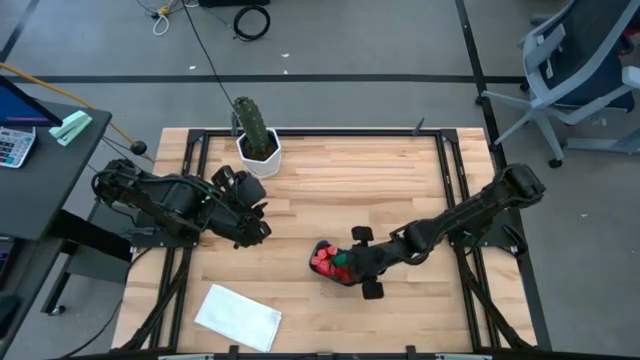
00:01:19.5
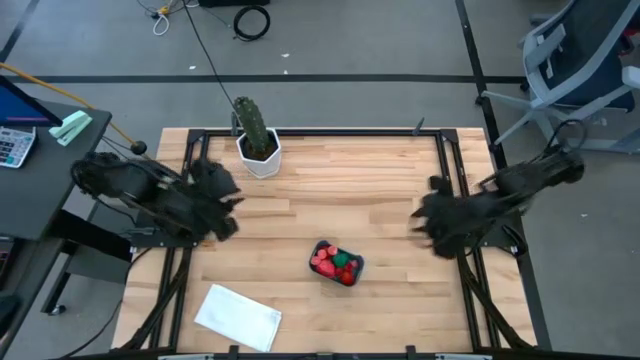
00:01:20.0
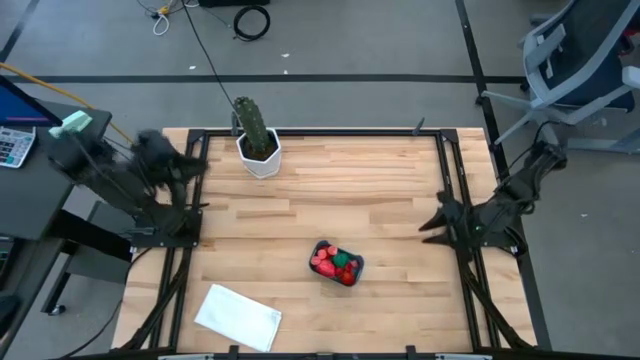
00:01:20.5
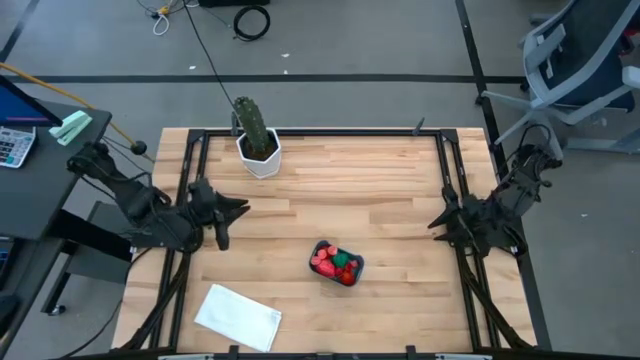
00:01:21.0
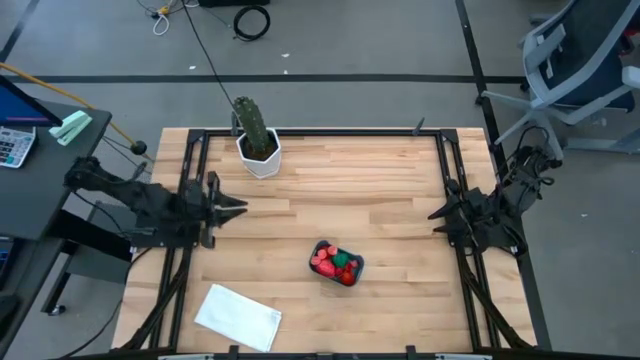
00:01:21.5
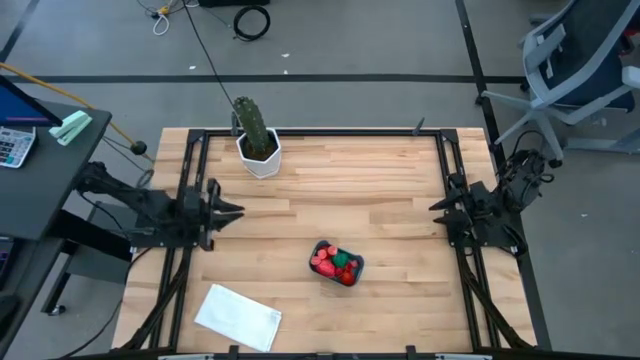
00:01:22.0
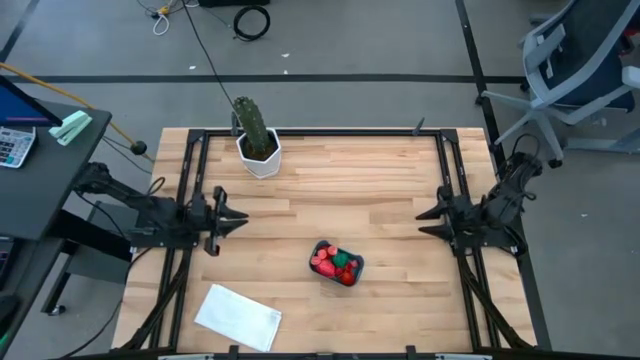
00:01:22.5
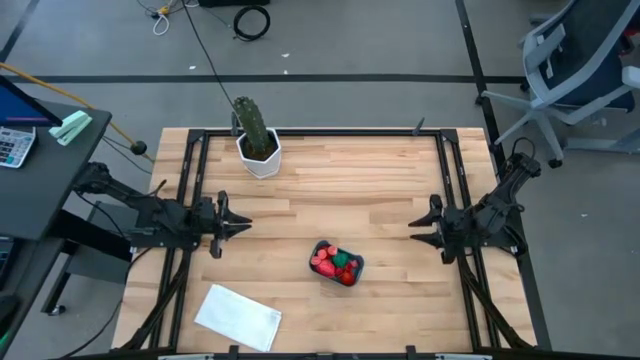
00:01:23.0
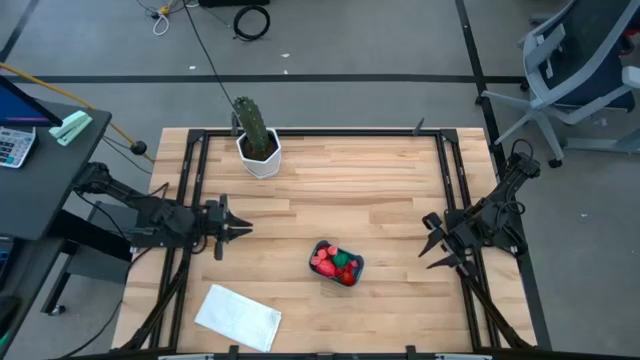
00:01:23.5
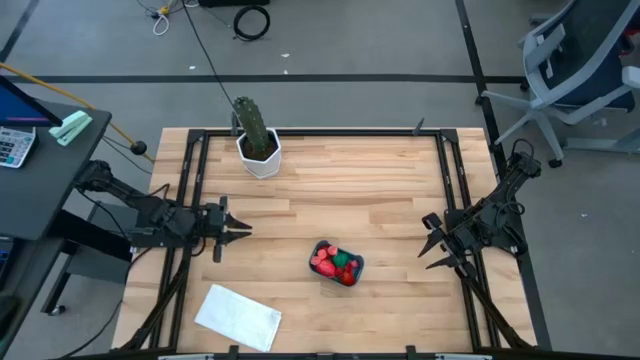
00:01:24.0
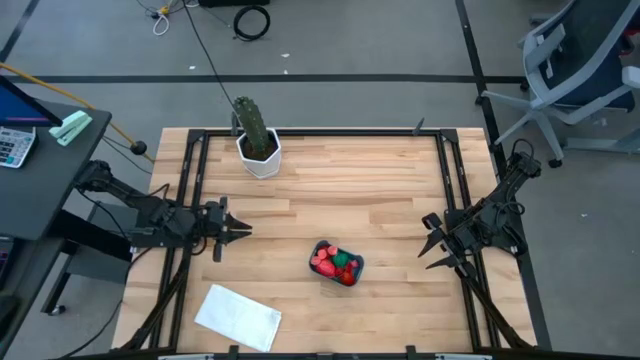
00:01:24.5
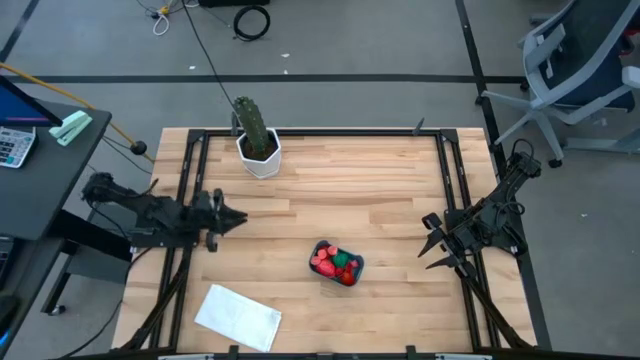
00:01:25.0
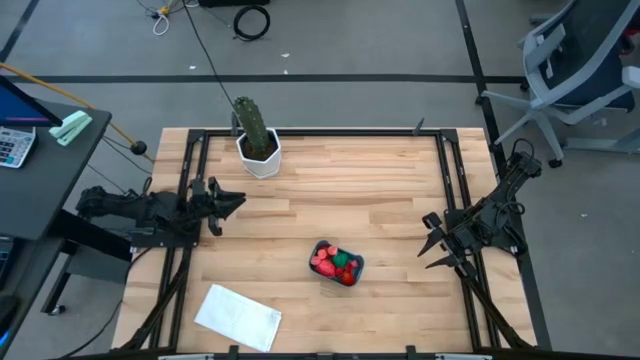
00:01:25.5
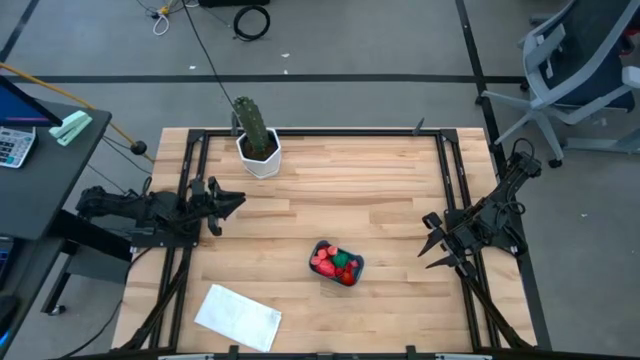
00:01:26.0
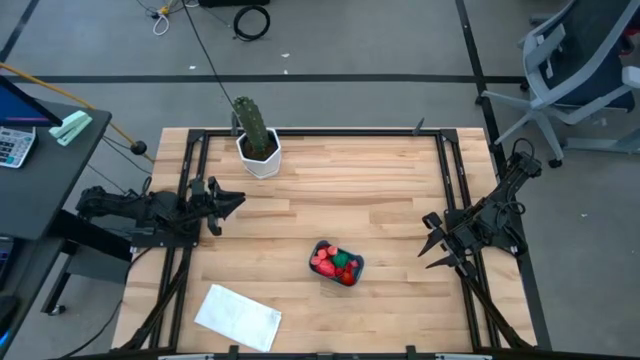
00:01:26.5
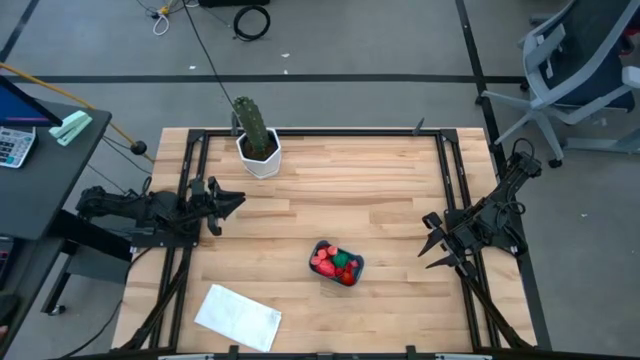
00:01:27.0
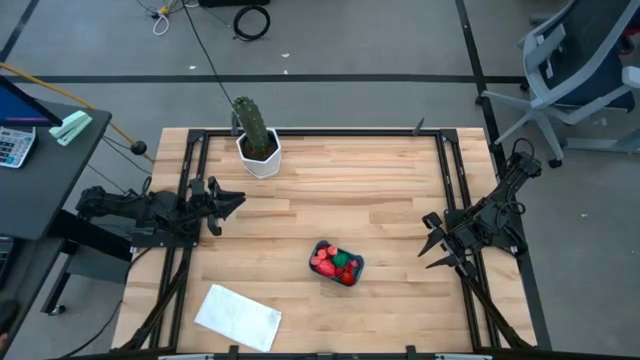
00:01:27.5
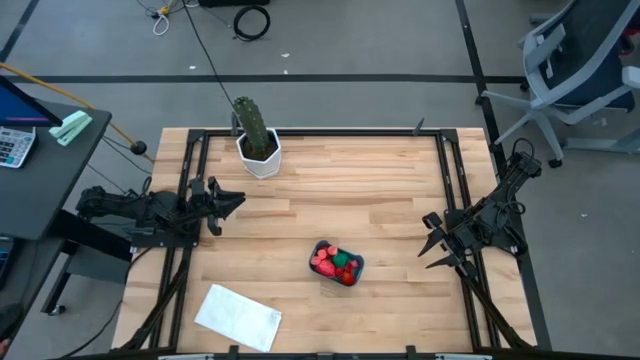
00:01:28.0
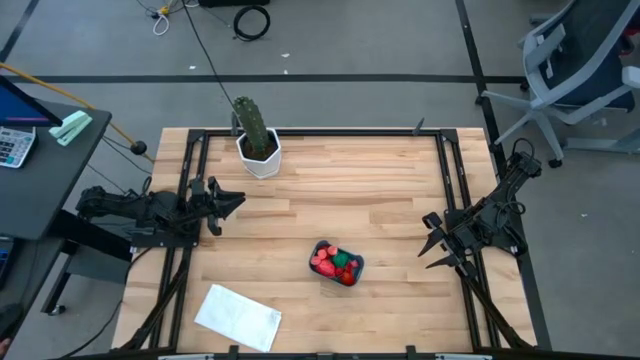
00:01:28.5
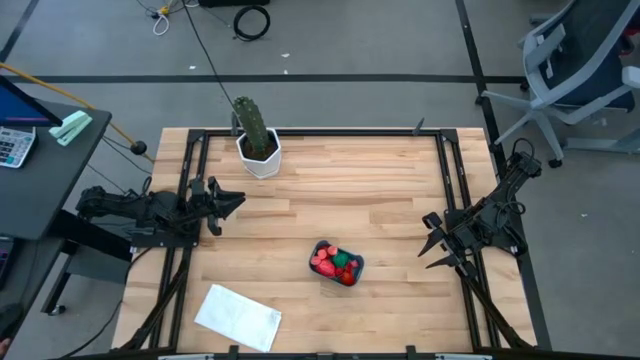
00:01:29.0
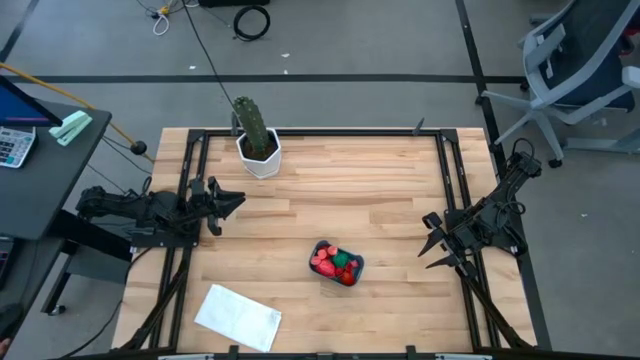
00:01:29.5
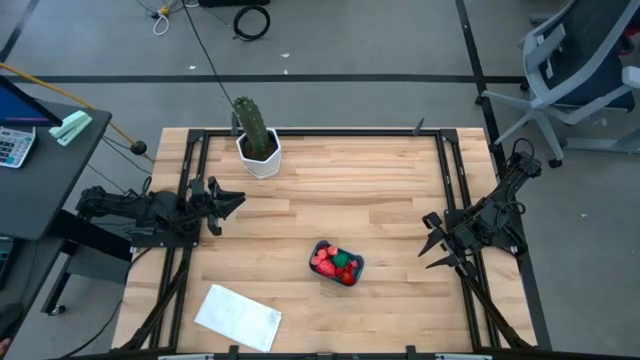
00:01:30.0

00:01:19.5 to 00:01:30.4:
Task: Pick and placing Produce into tupperware
Return to Home Position

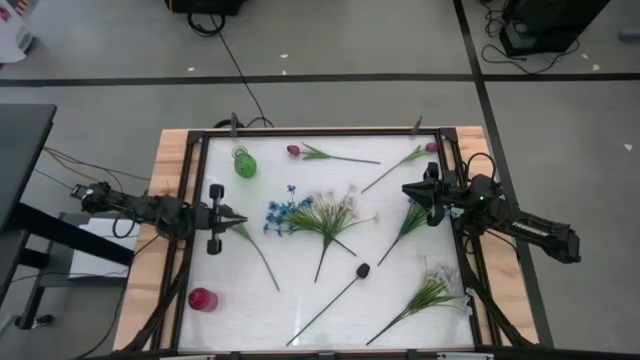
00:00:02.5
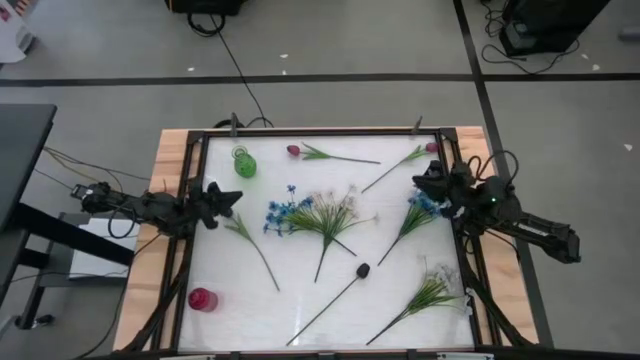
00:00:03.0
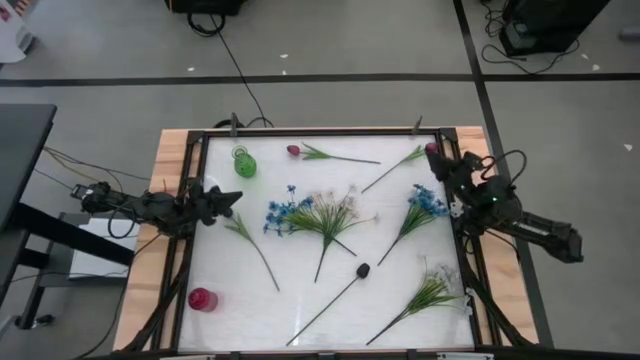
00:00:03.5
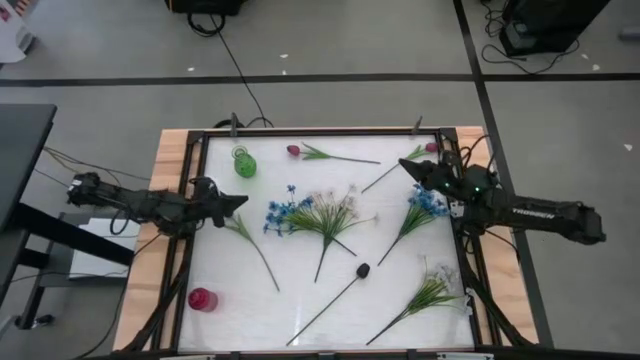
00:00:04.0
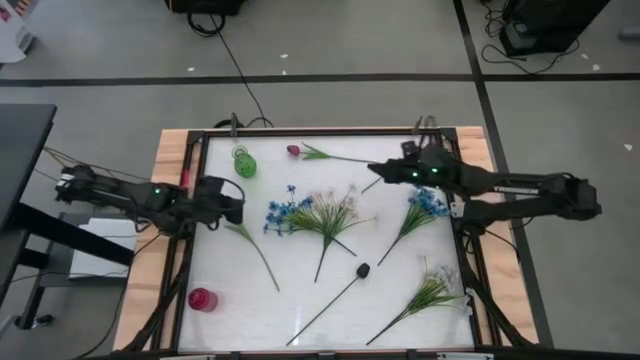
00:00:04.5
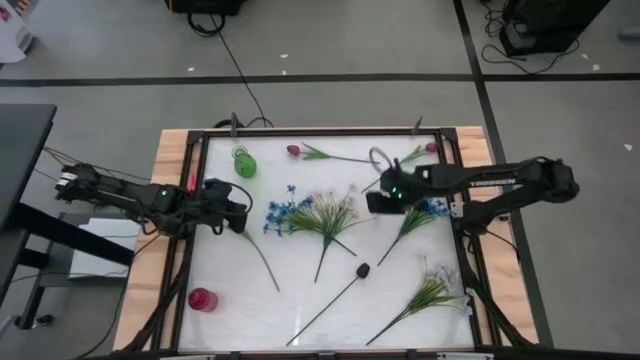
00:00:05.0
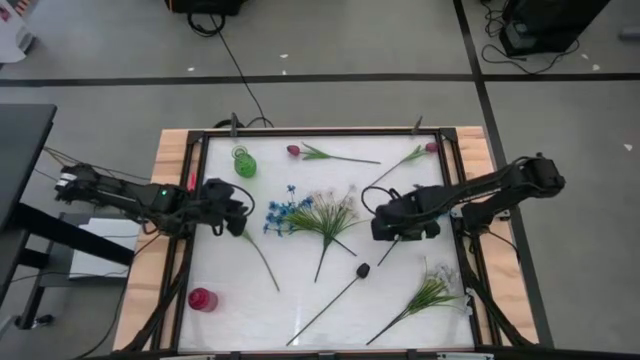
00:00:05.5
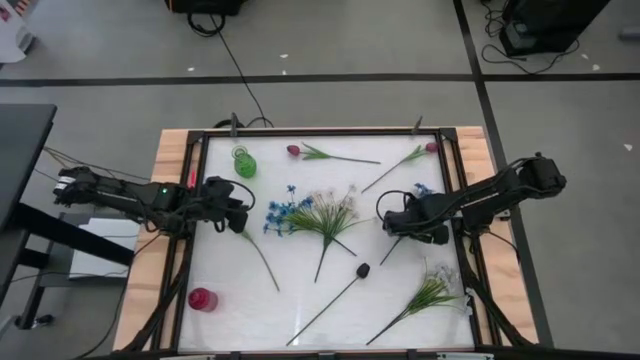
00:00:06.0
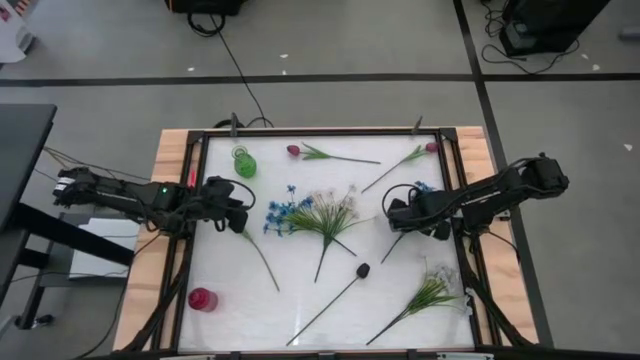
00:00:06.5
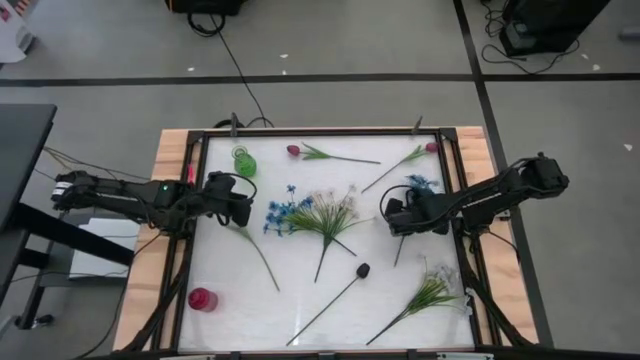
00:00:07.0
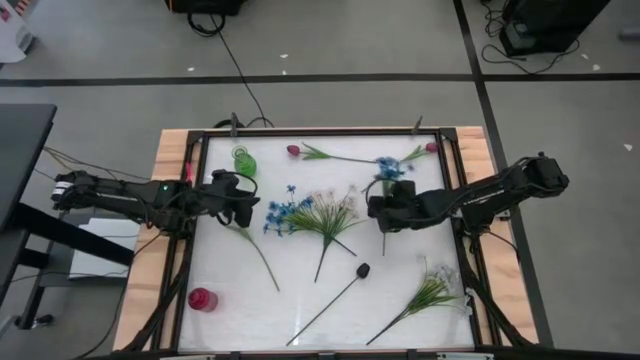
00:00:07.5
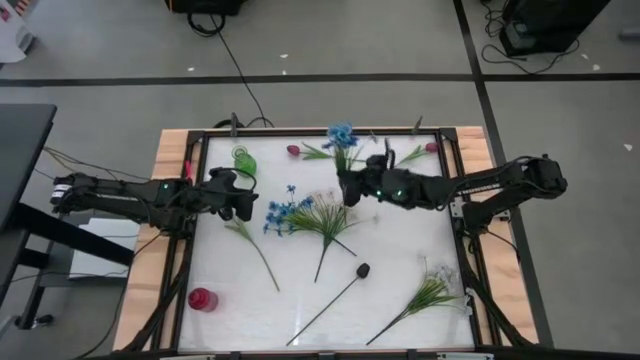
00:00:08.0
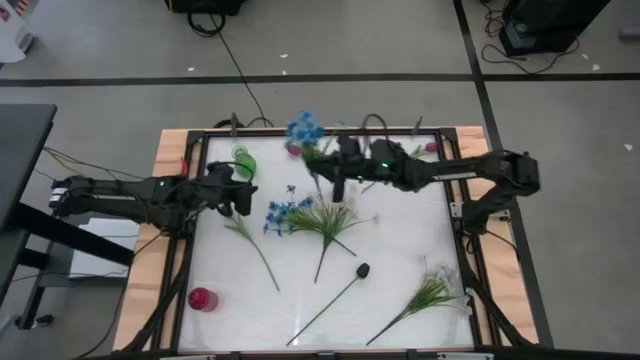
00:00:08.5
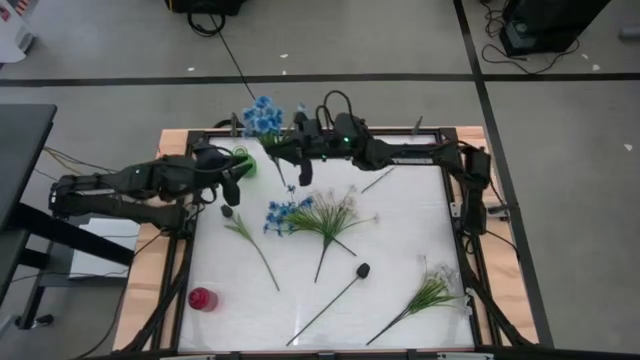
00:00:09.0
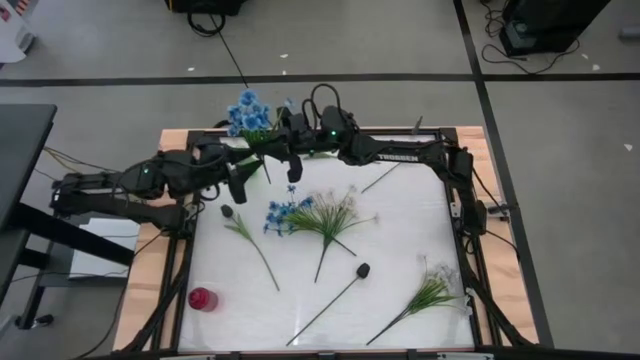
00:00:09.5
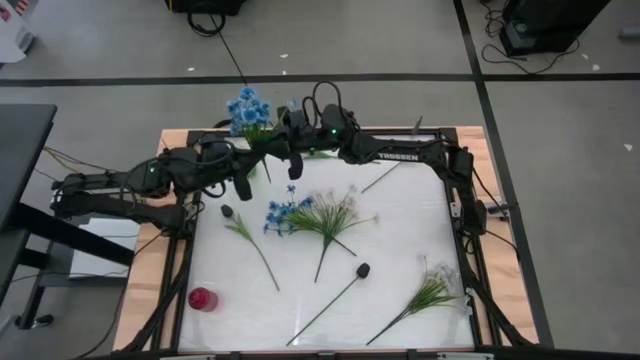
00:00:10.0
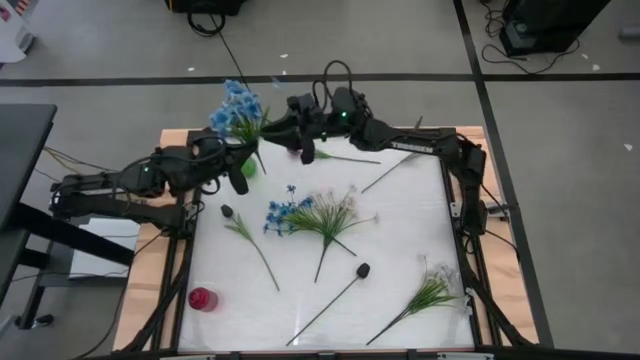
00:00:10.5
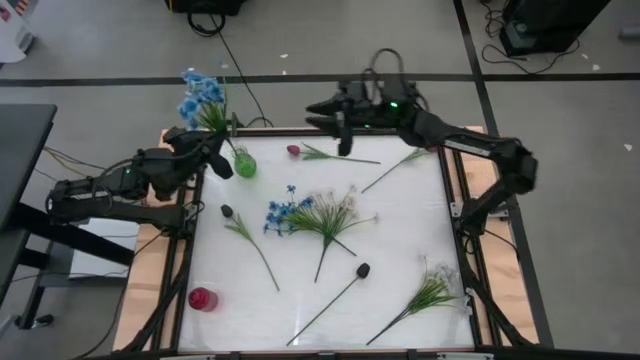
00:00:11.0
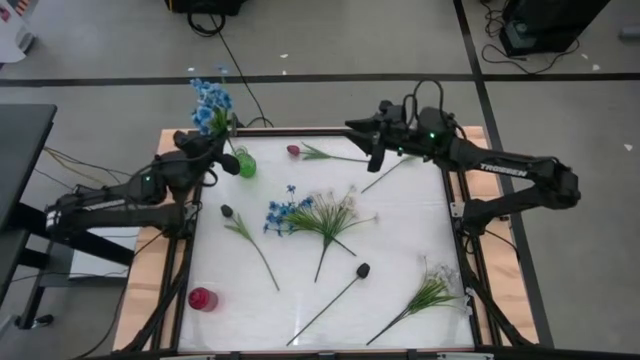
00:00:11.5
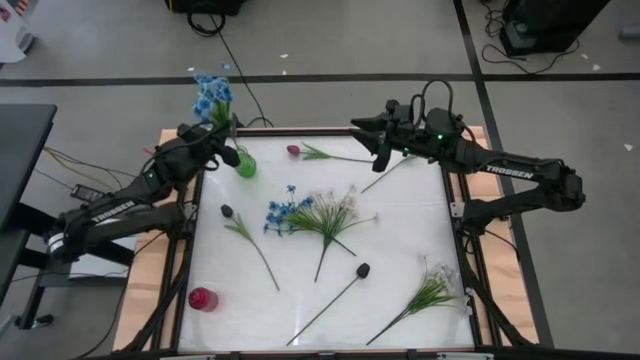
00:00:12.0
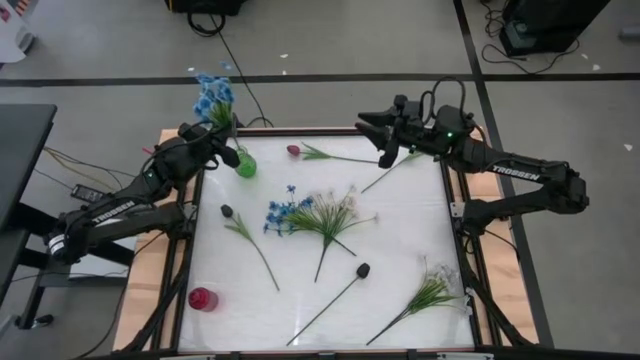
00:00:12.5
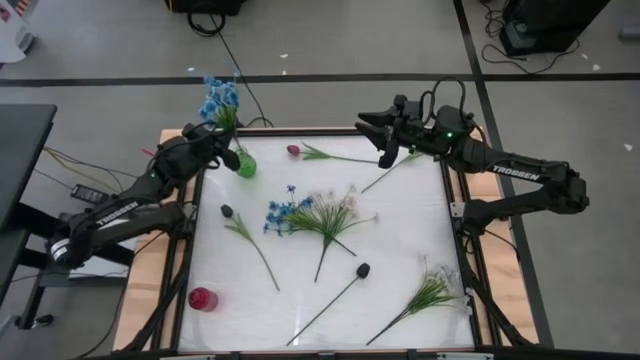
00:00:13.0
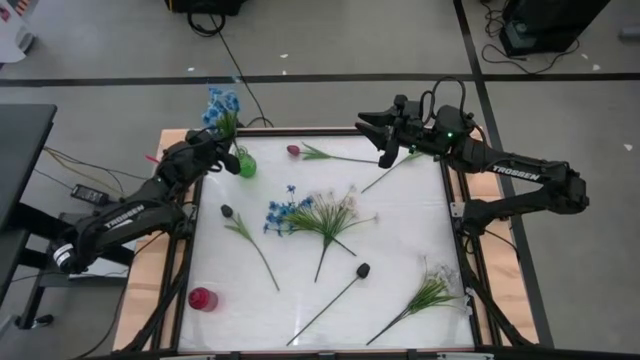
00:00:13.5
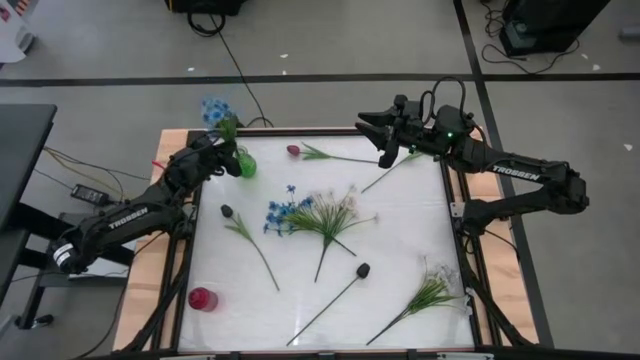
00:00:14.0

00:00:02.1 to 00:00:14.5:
Task: Sort flowers into vase by color
Put the right blue flowers into the green vase
